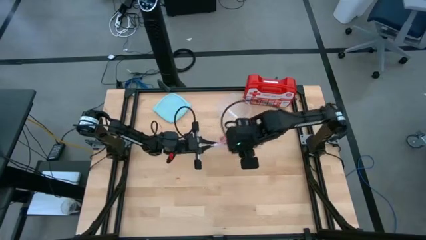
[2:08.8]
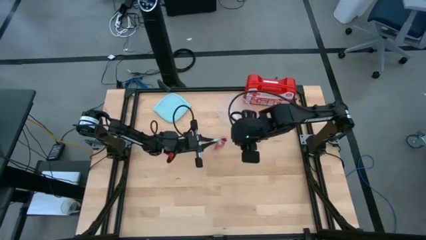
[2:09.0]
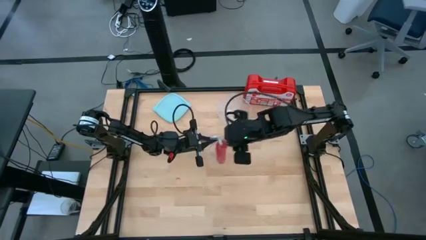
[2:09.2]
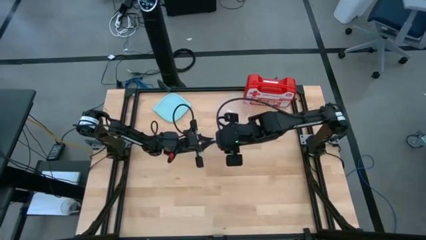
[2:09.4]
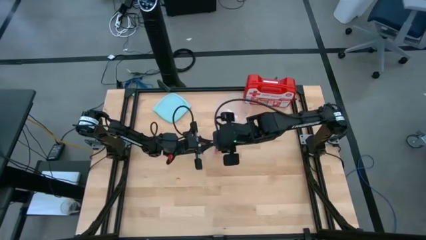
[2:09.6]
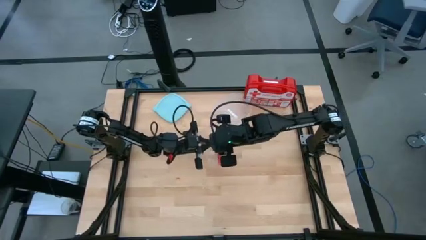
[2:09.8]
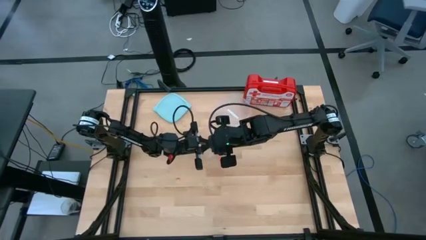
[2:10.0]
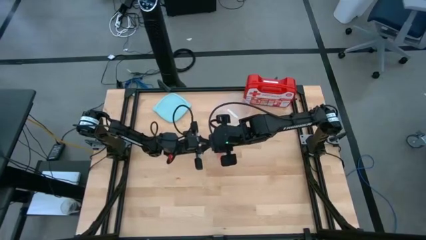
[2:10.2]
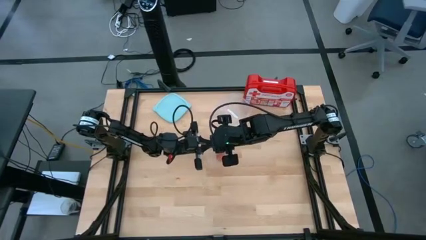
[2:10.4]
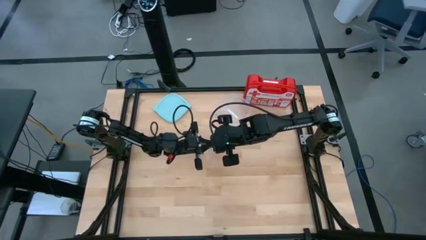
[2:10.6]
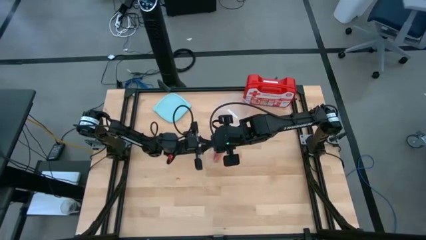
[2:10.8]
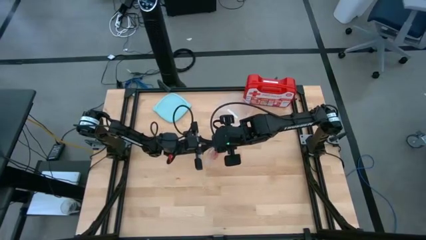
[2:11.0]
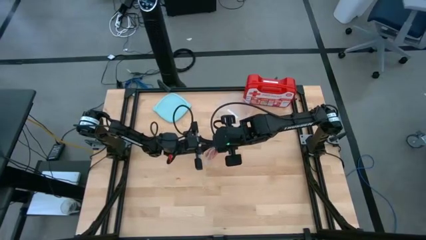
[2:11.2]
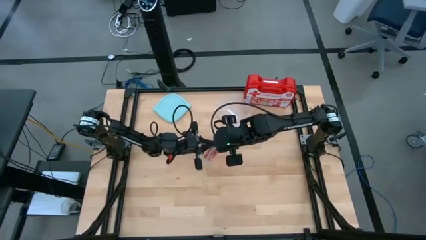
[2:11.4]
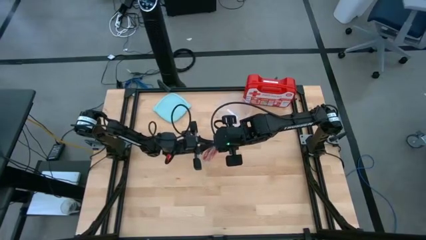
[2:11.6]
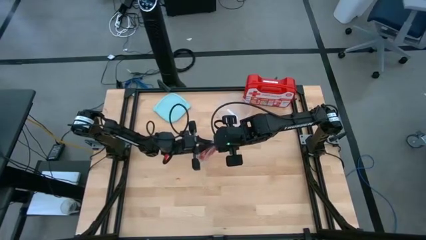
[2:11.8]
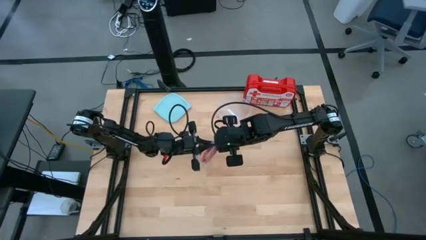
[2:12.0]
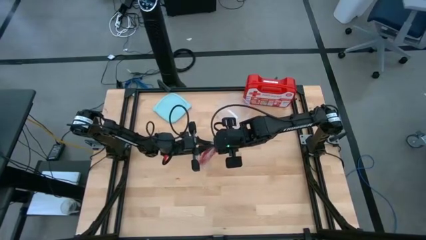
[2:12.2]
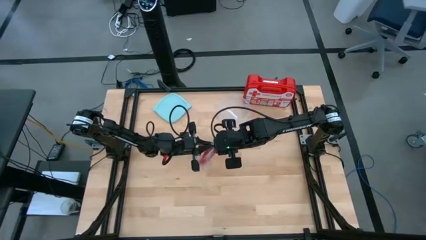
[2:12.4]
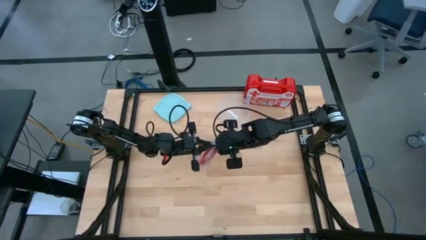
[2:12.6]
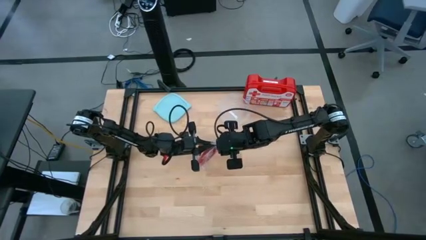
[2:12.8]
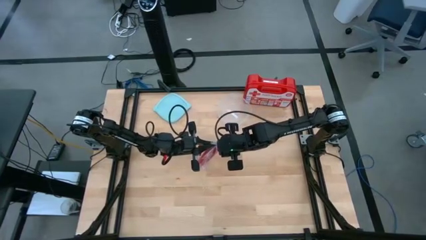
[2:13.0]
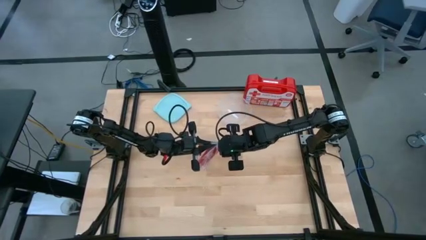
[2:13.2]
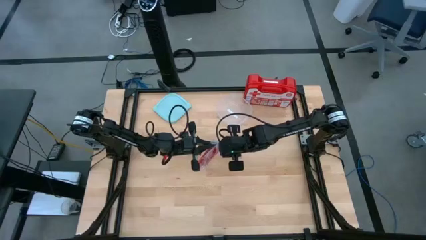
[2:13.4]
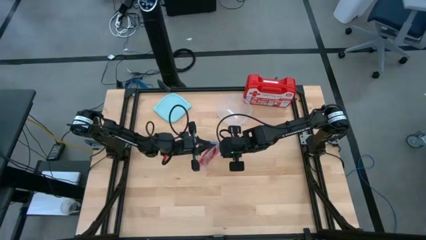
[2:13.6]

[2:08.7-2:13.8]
Task: Roll bandage
Close the transparent zip bag

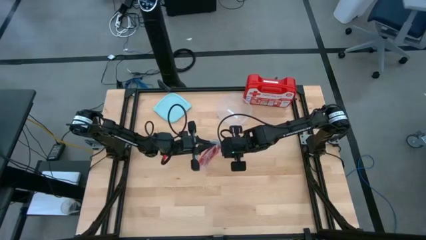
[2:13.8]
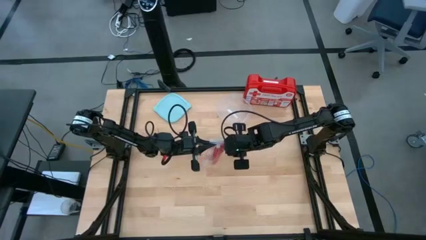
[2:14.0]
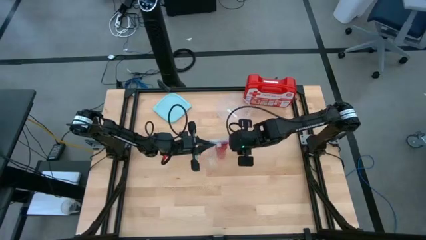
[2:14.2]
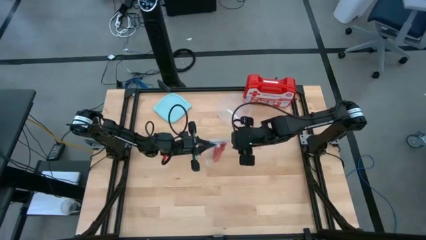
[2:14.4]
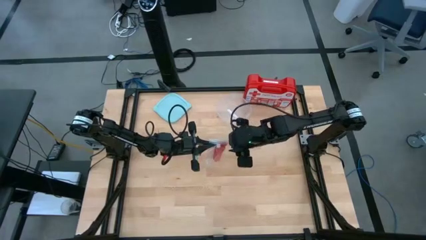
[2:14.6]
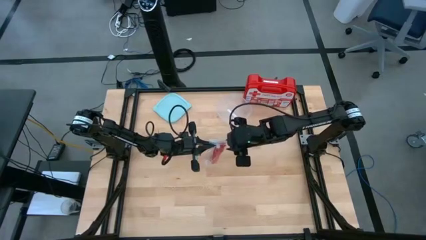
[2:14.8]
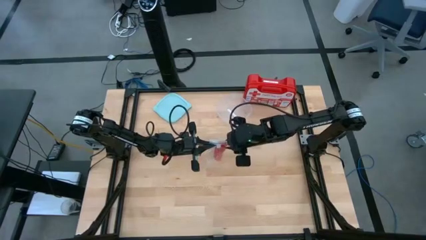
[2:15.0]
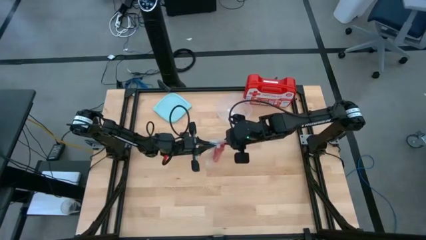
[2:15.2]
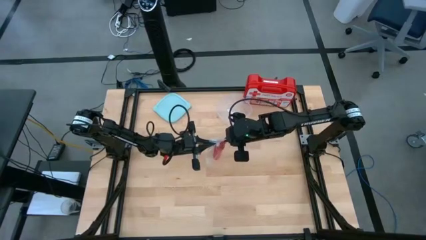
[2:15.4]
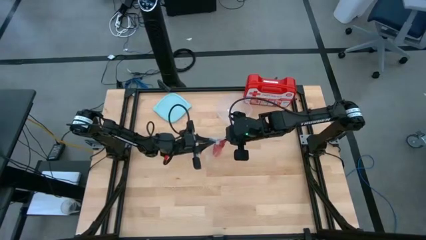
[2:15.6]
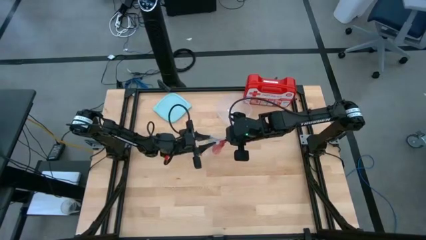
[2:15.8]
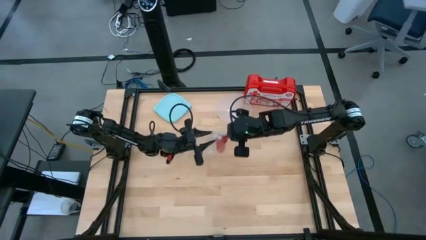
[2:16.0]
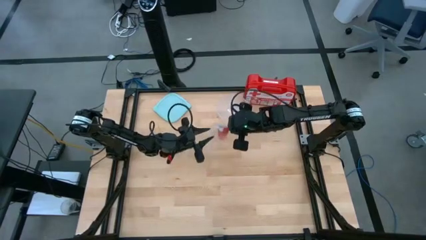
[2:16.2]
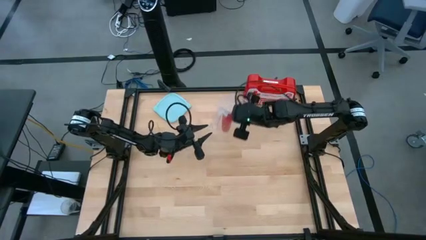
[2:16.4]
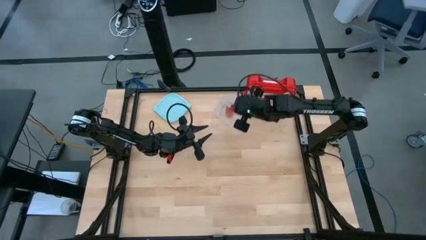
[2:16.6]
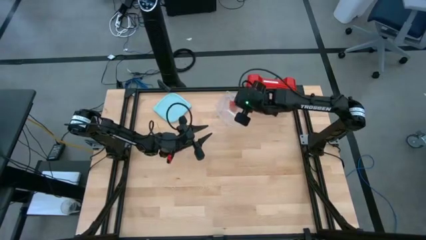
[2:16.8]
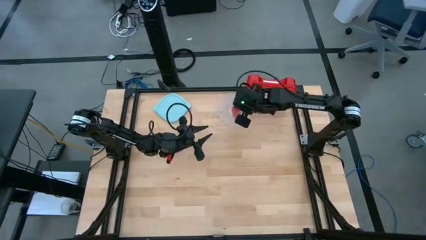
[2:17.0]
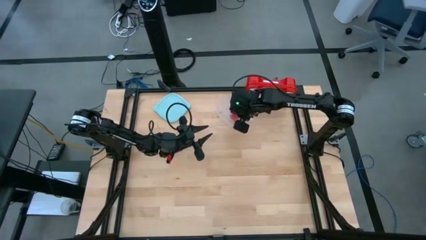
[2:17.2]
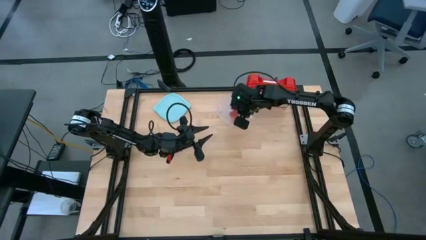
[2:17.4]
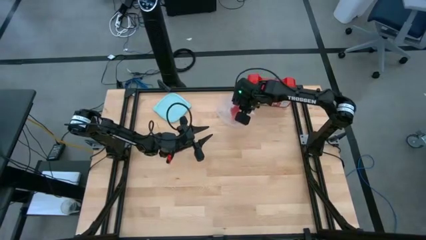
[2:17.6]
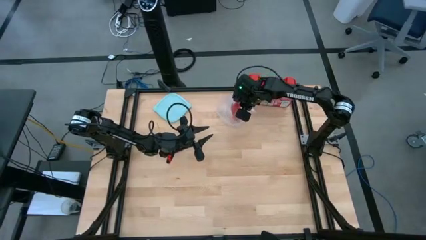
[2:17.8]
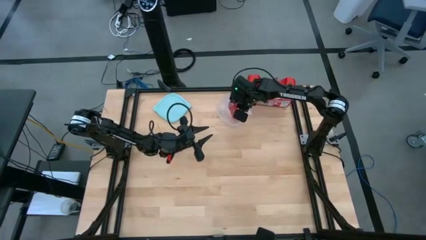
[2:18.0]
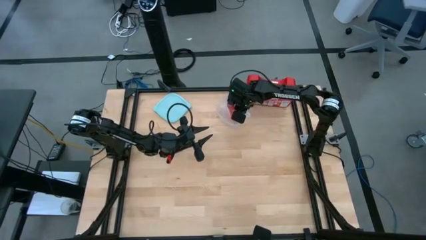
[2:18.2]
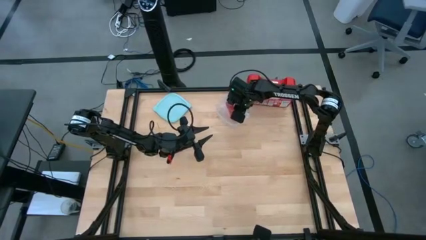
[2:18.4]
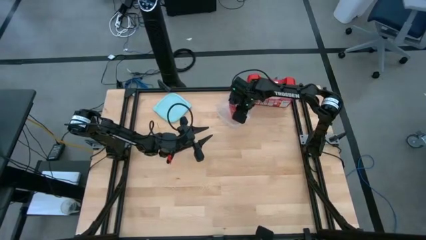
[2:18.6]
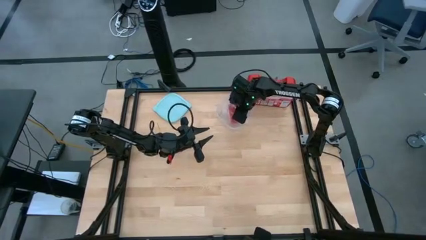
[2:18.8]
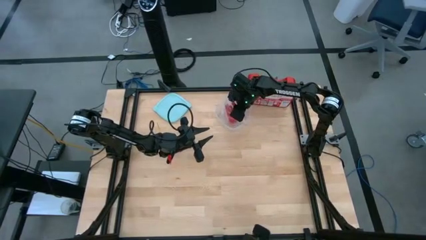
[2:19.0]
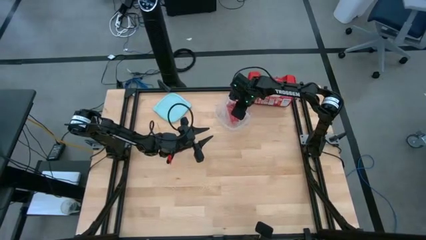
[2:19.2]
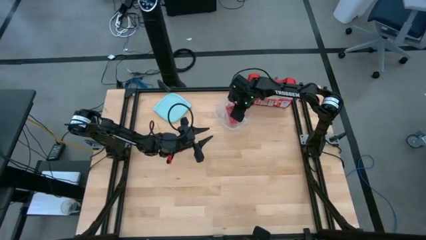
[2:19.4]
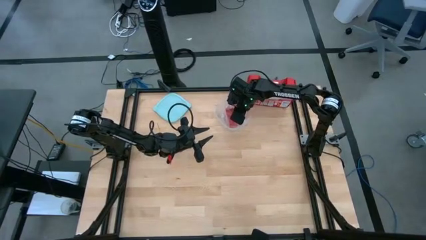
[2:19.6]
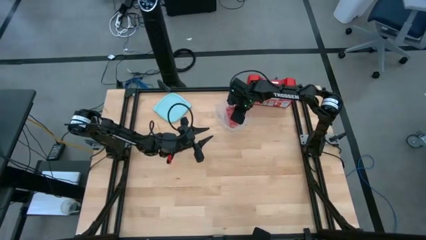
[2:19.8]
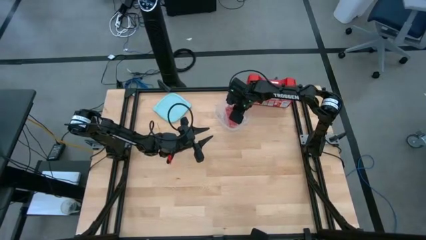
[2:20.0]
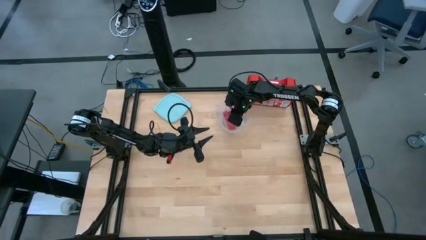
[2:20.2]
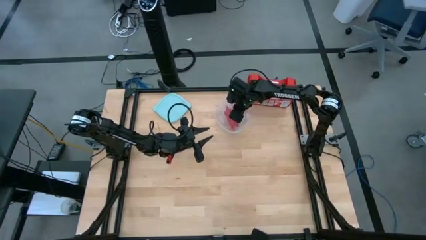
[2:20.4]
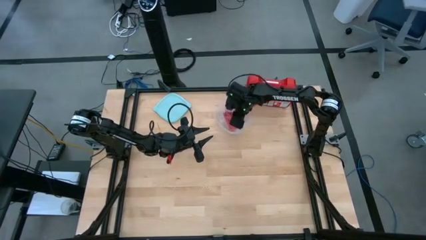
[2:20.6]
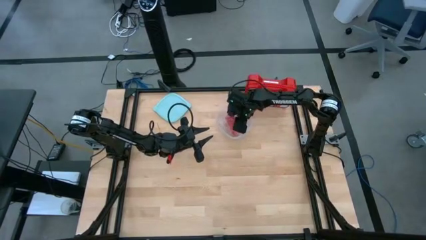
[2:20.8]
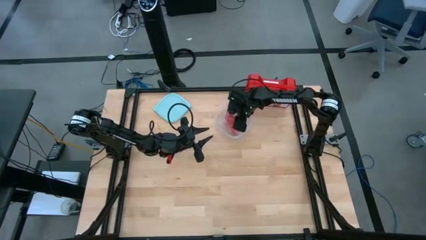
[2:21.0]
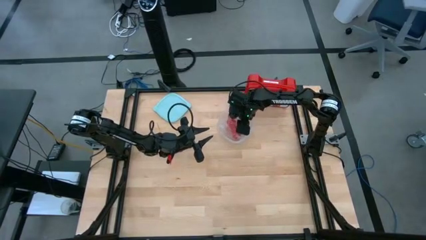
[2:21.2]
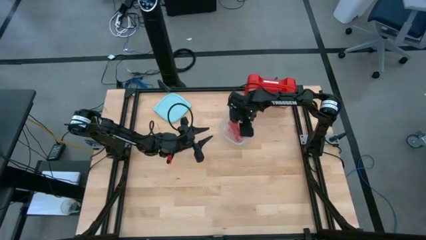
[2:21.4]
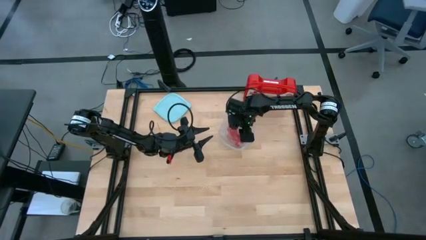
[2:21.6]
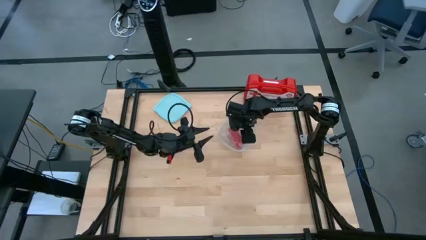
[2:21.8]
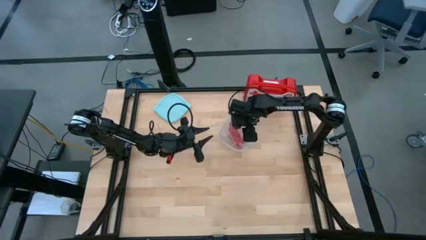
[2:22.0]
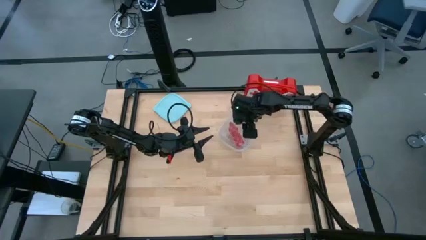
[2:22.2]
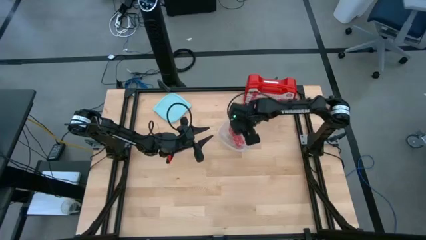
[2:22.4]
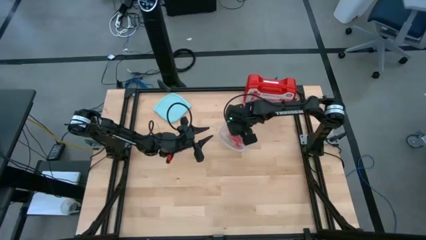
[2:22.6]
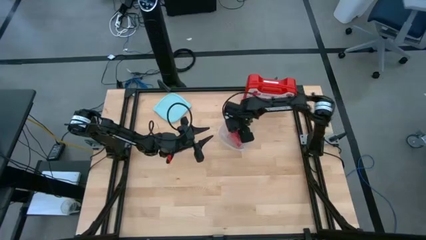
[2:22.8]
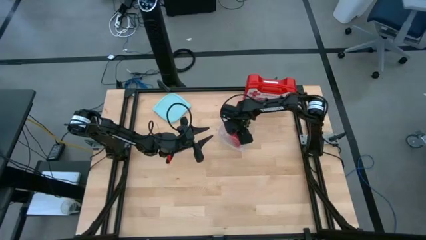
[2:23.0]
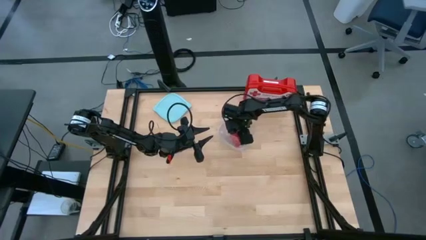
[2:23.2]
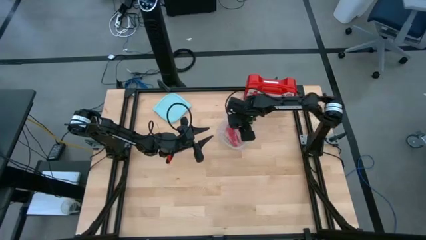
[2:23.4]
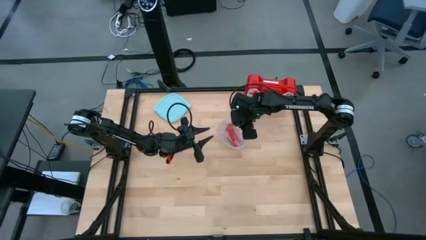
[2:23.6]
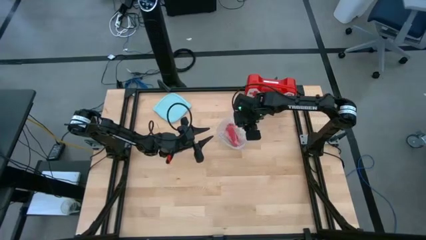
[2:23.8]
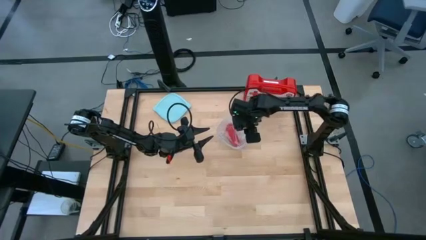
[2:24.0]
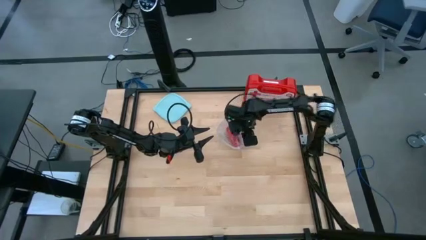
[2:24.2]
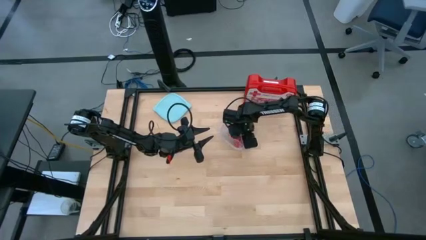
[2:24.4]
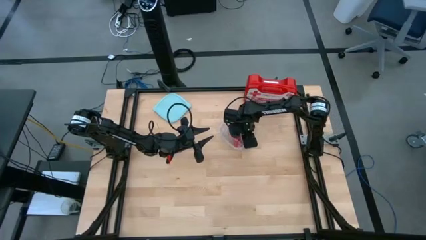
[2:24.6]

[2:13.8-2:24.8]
Put the transparent zip bag with the red bandage into the transparent ood container
